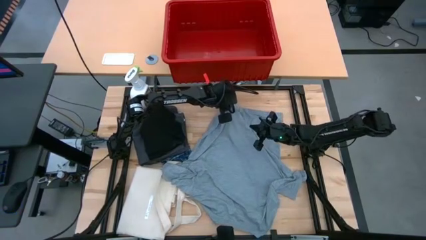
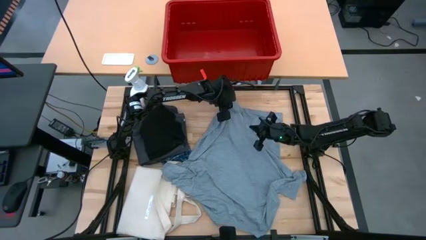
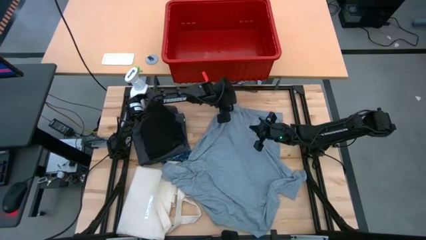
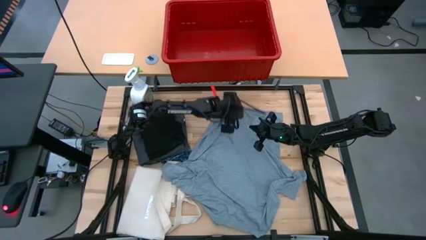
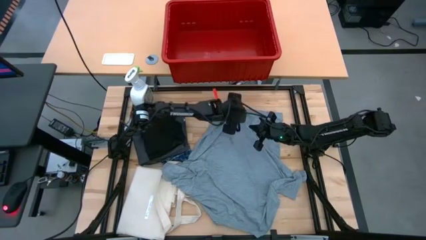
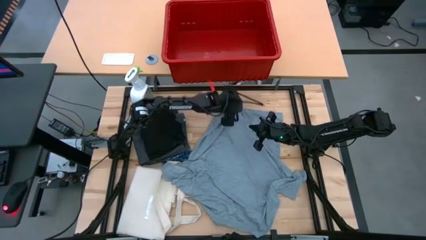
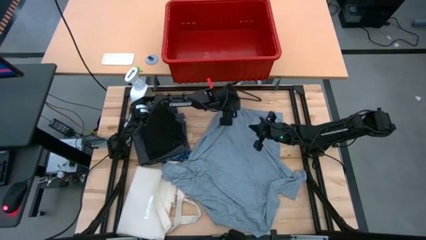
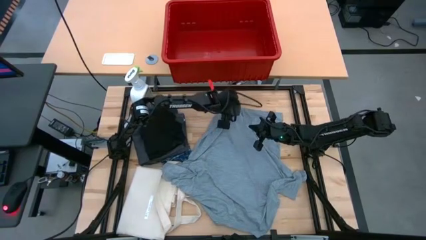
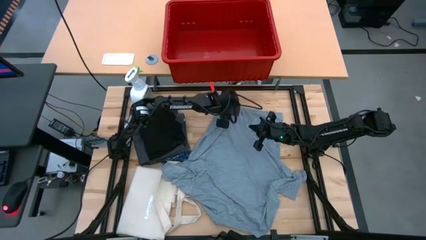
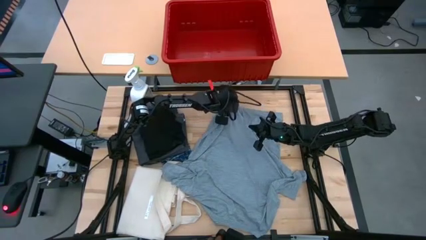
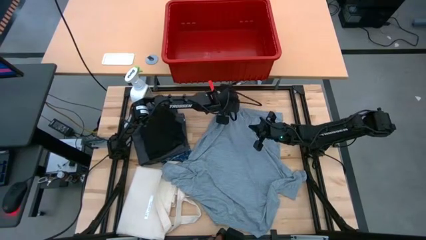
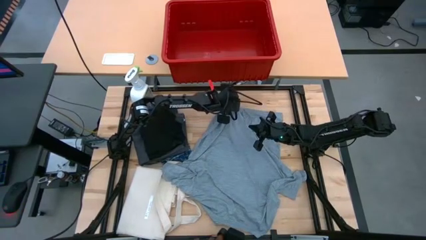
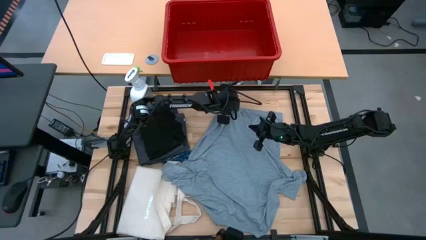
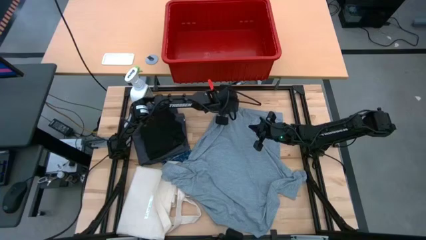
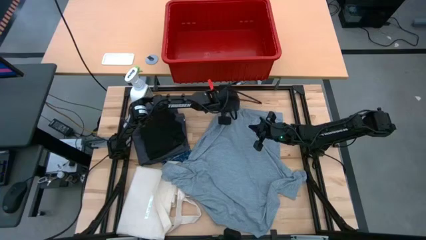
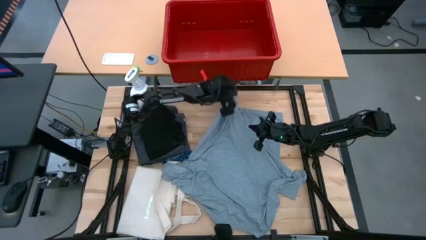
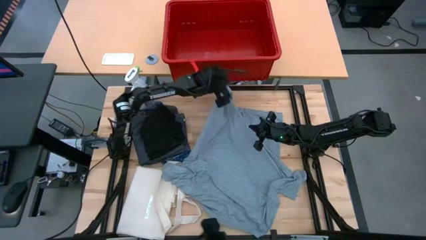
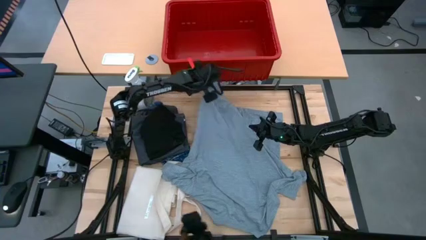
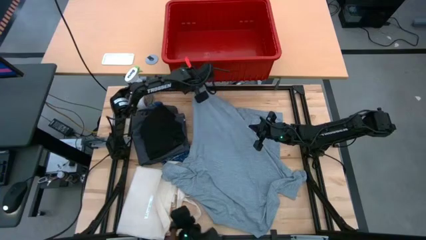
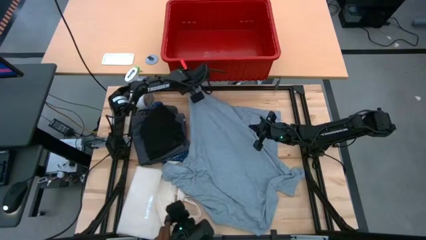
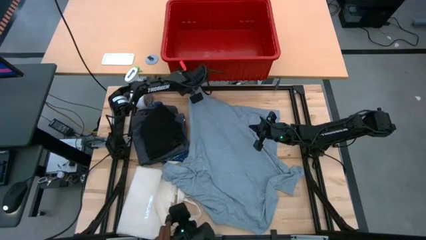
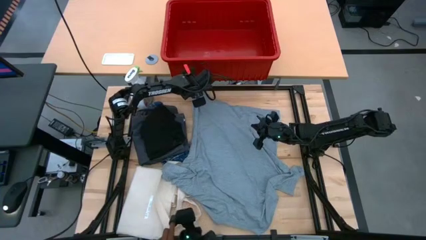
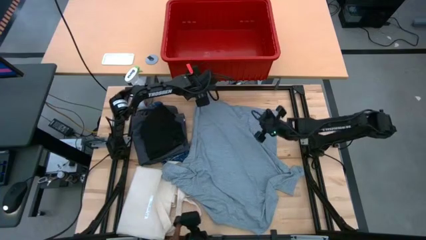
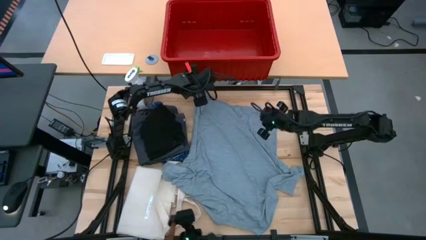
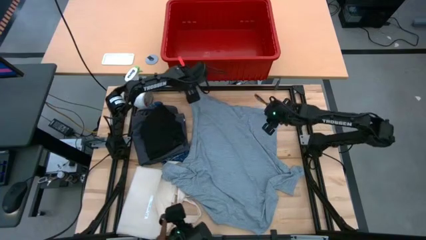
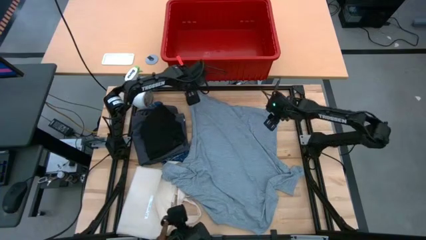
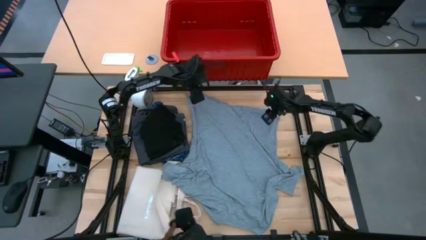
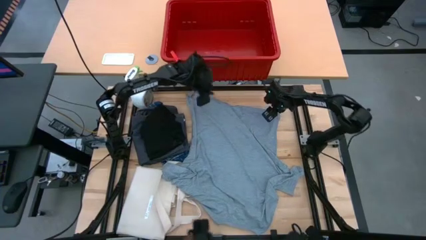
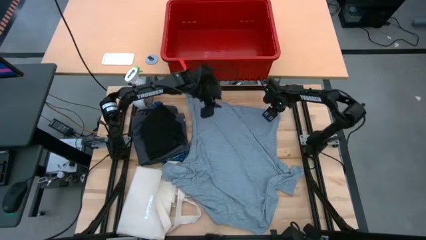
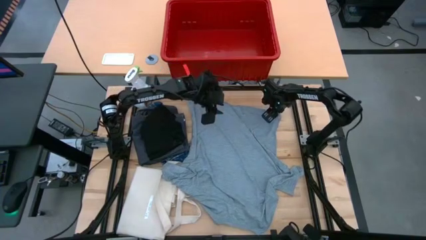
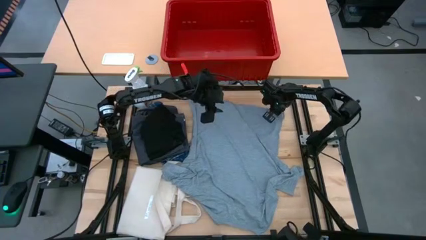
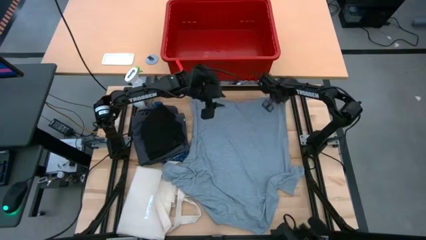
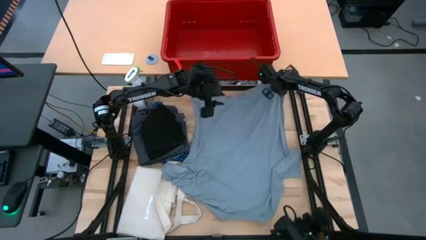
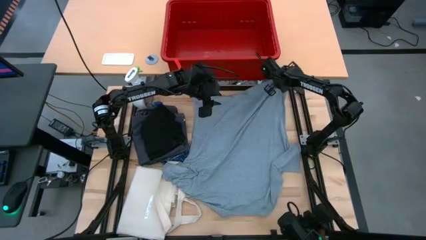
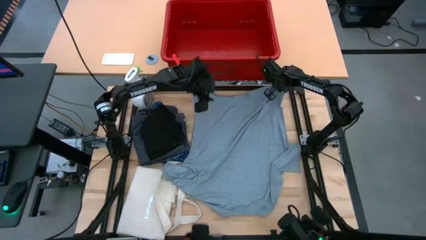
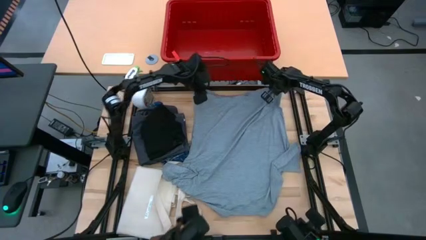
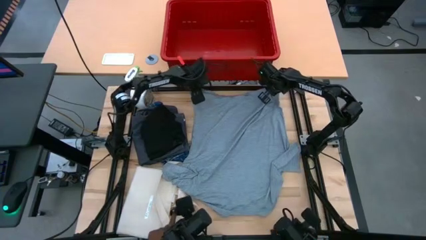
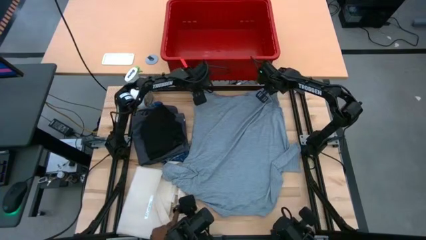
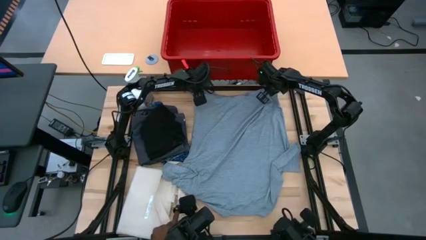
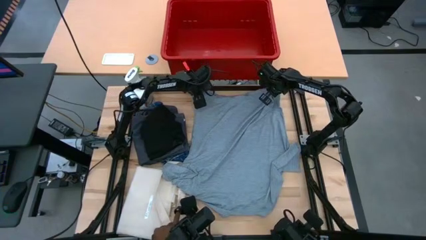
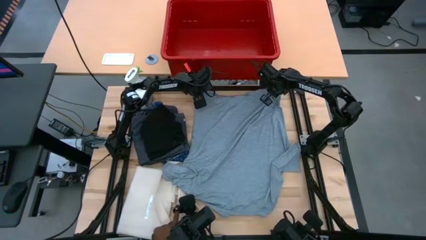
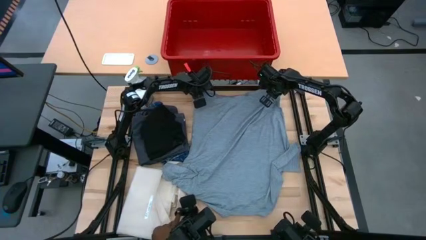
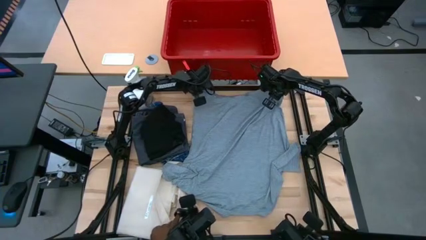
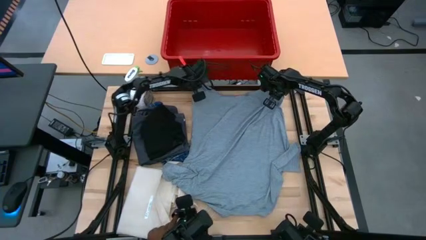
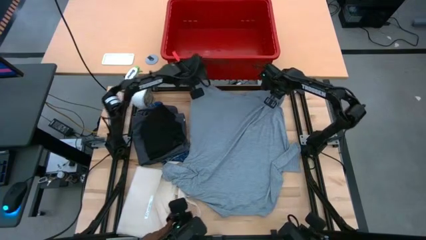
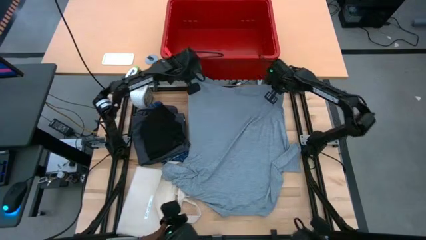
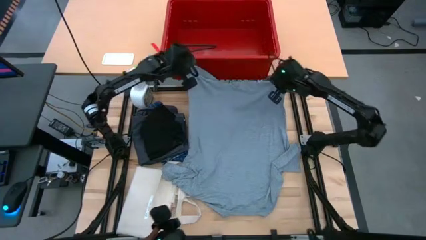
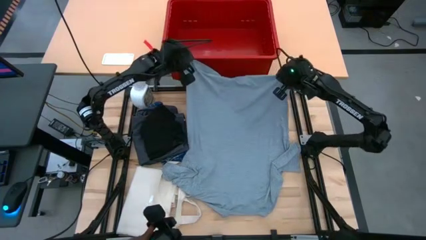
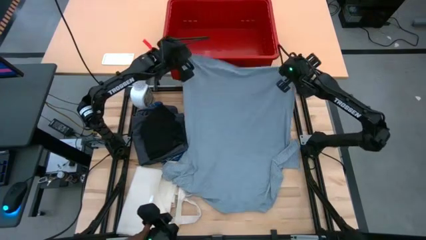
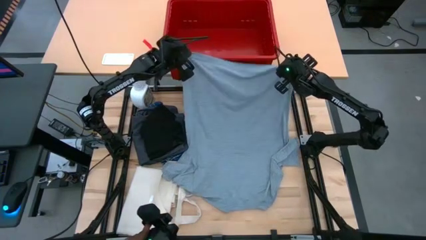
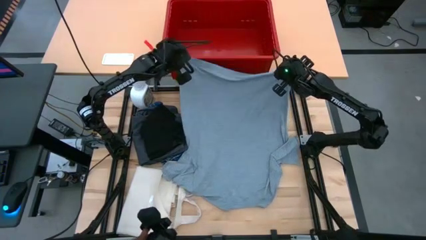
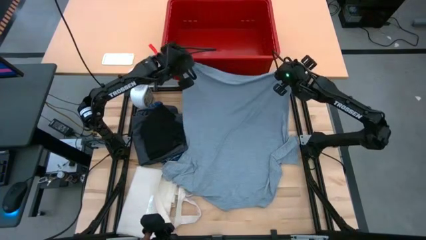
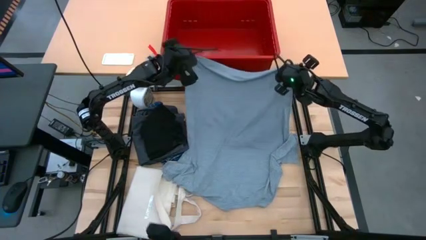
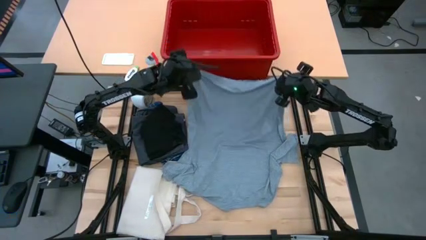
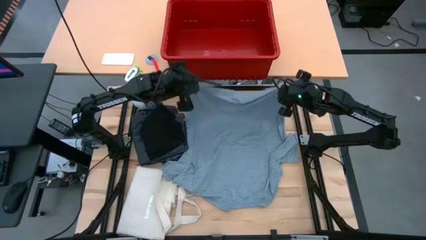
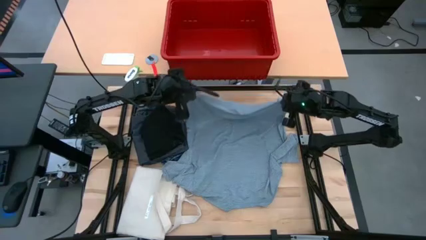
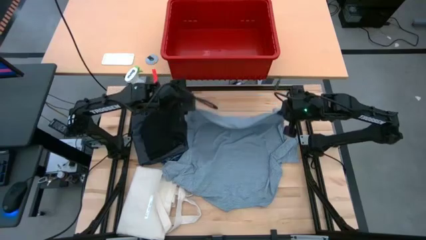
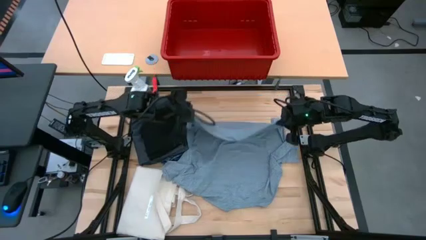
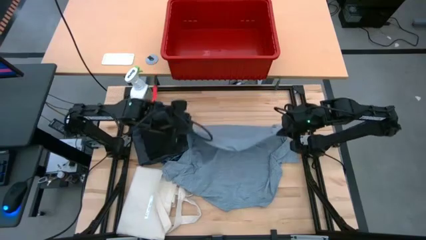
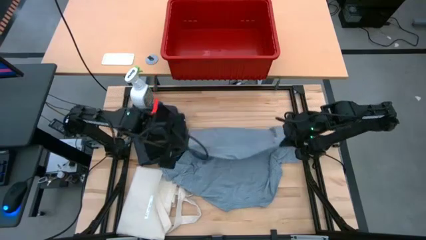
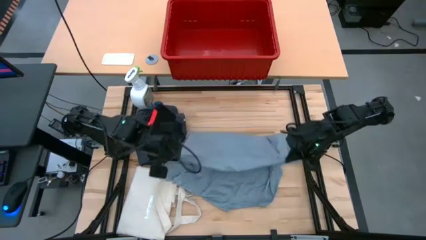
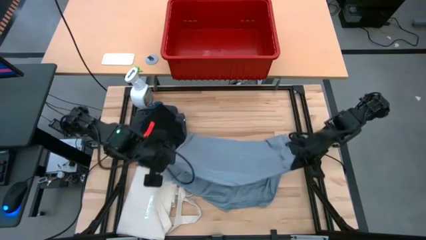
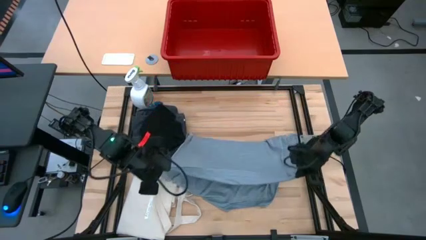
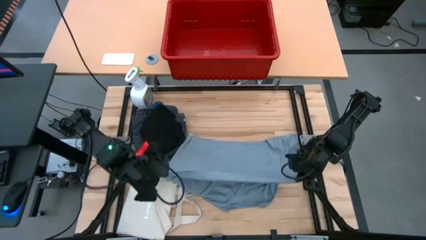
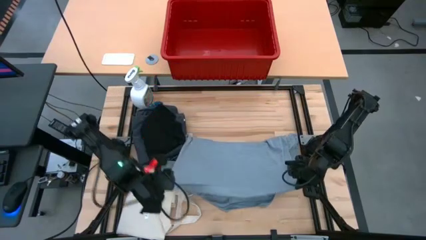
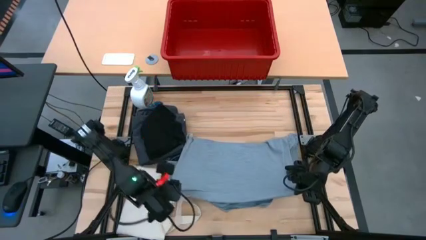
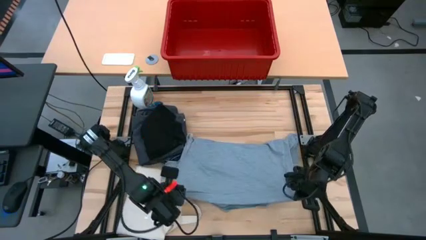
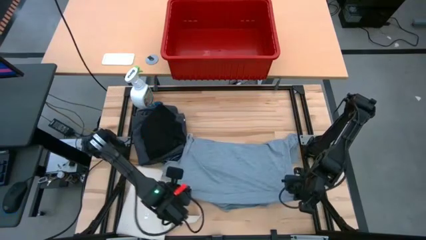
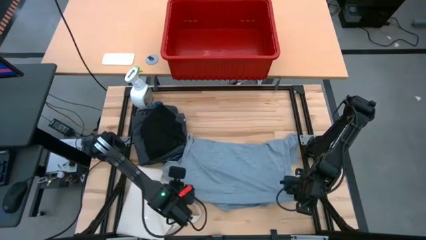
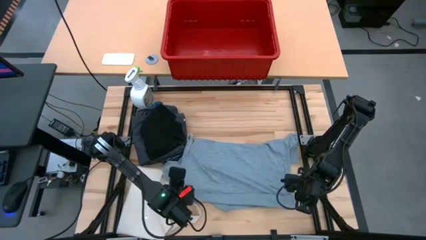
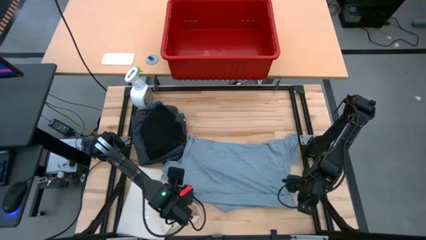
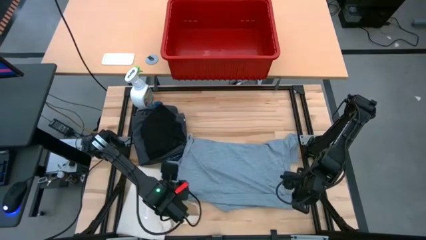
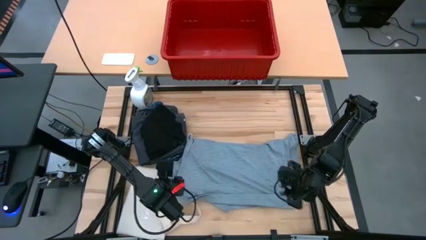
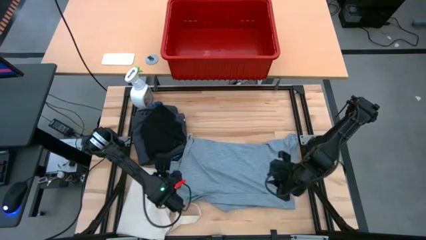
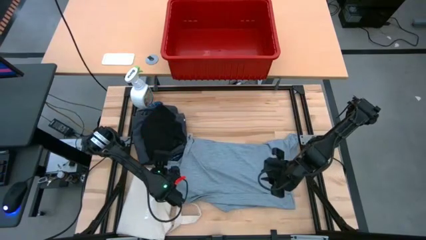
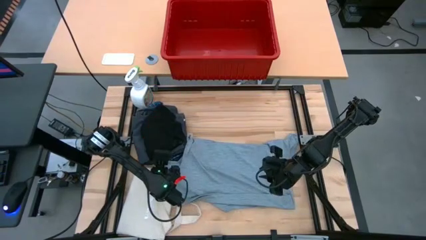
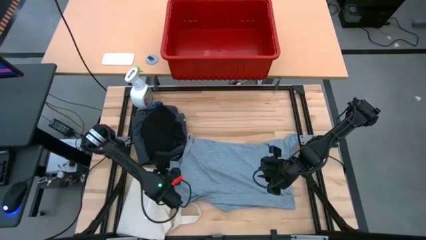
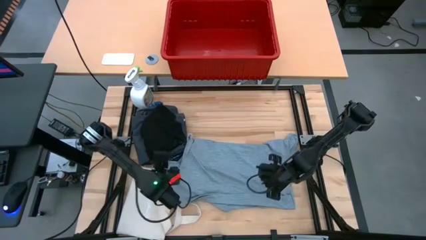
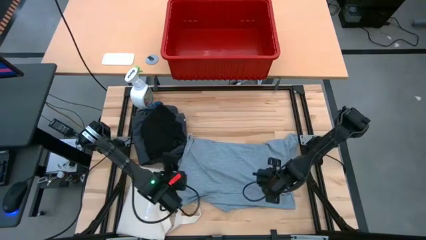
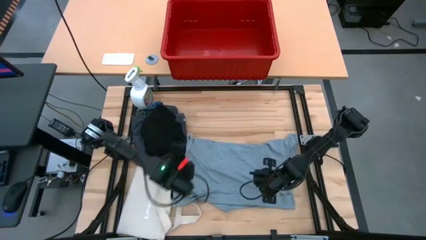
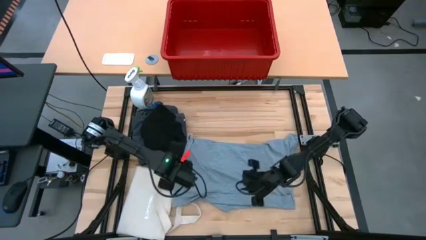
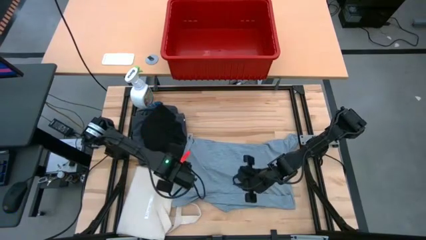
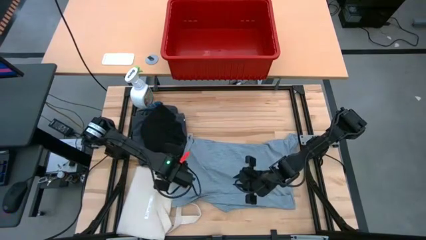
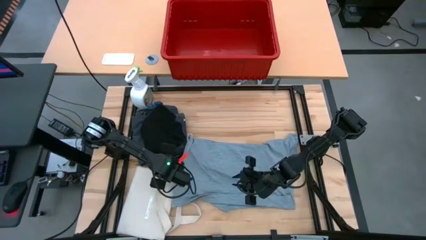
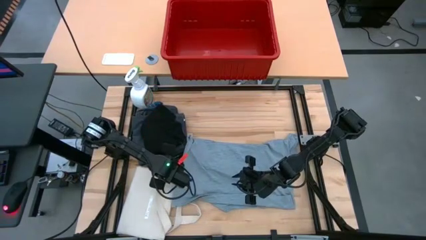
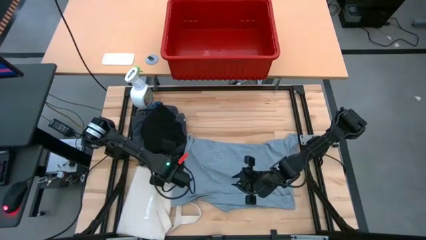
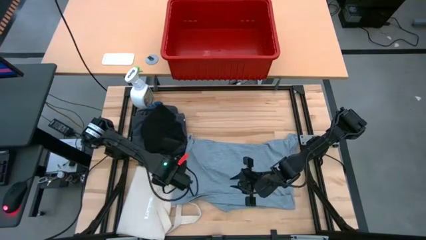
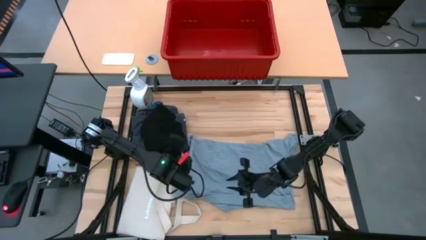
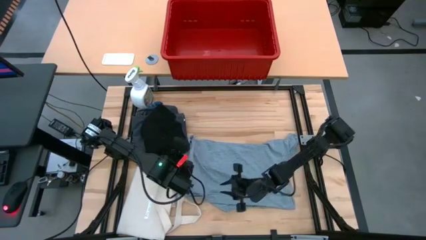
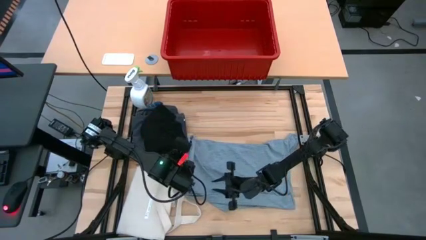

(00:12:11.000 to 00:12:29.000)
Task: Fold Laundry from Bin
Fold the gray shirt
